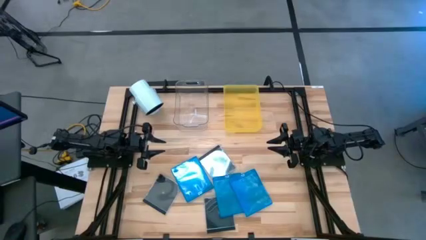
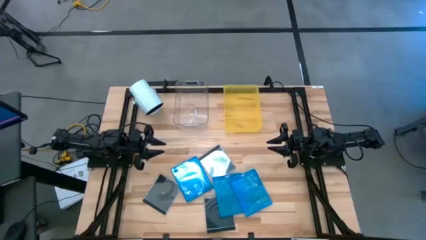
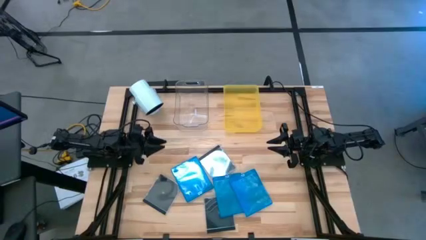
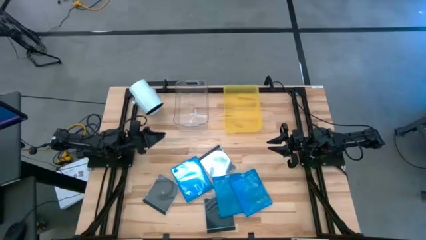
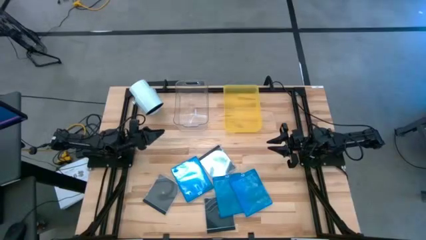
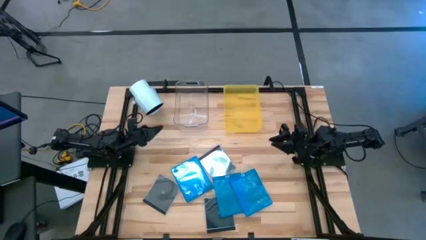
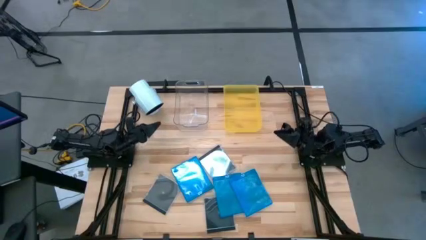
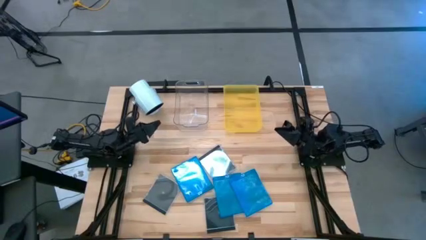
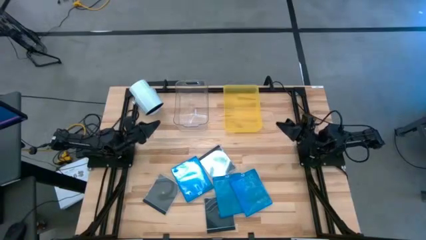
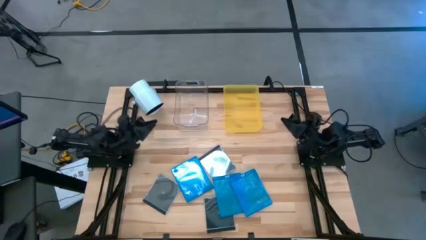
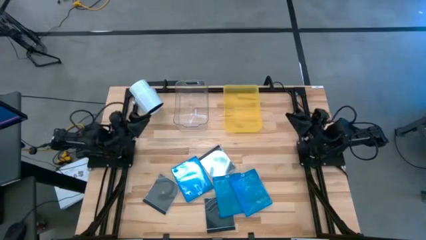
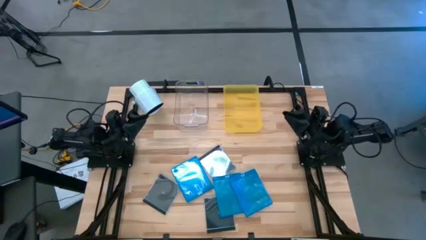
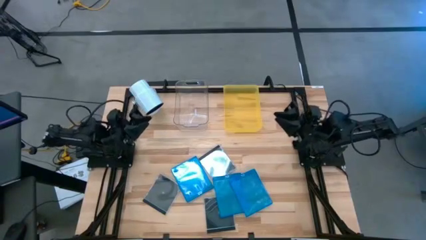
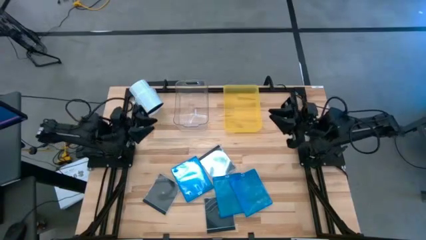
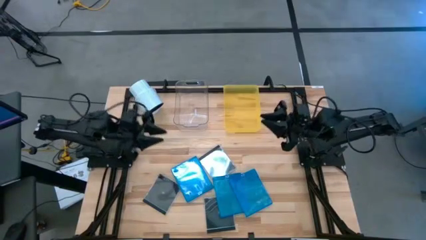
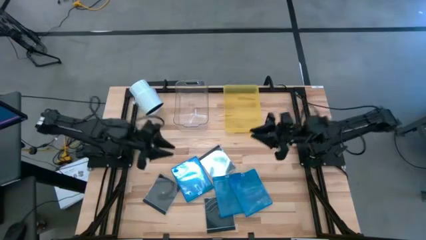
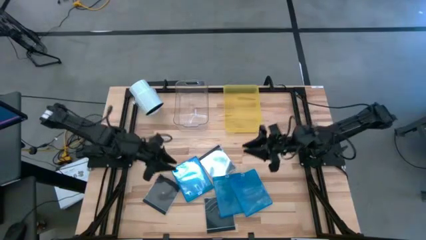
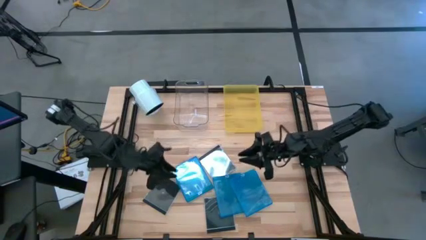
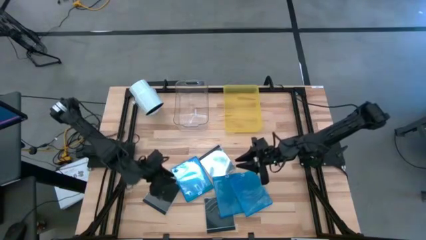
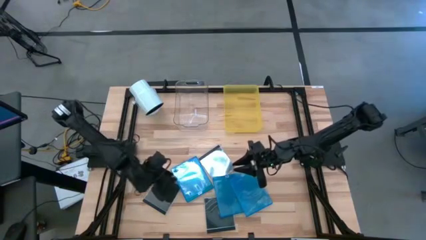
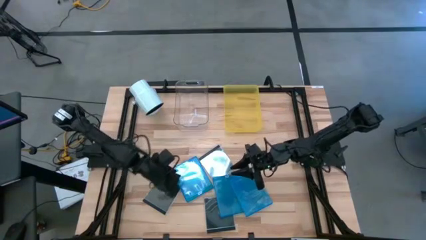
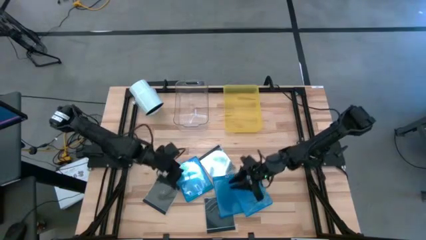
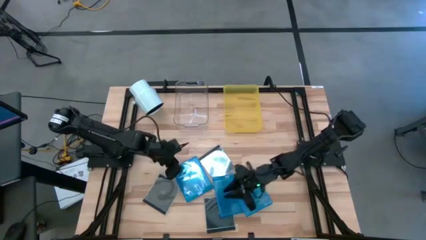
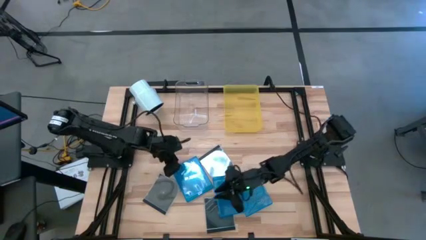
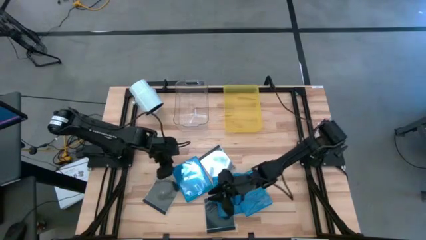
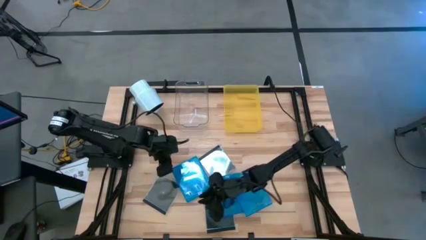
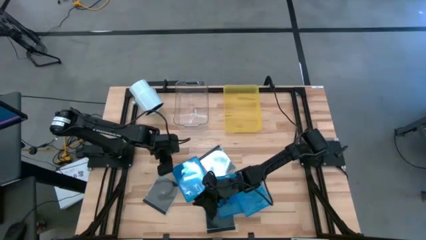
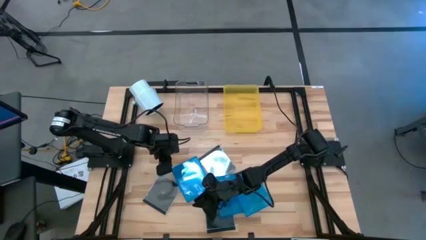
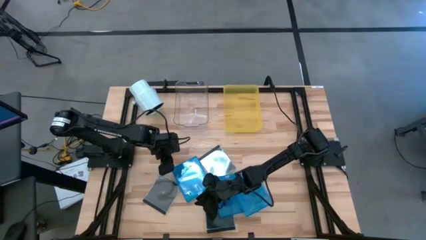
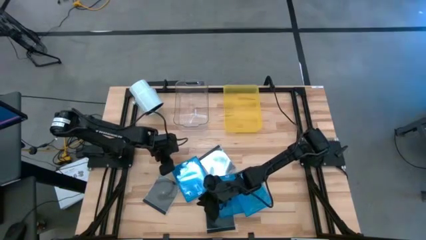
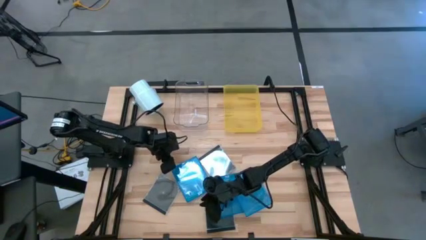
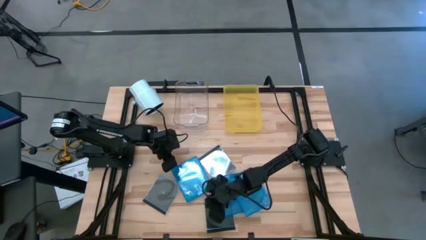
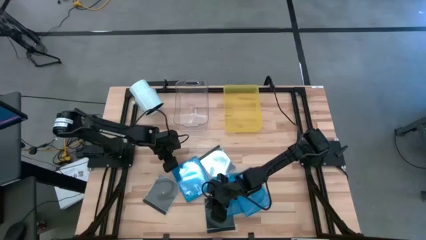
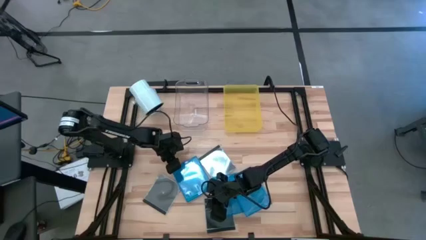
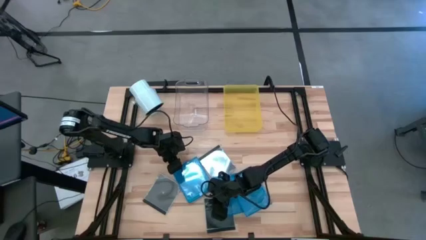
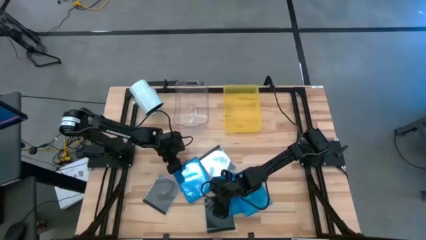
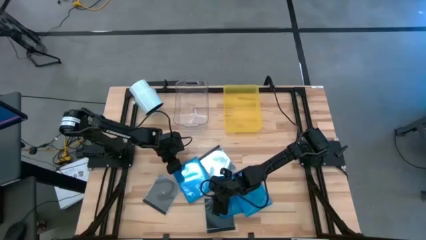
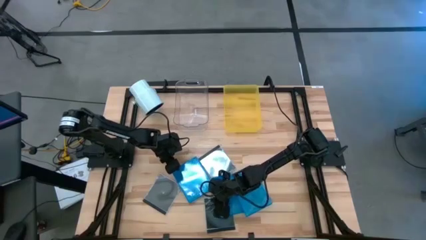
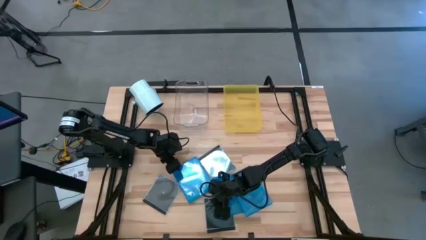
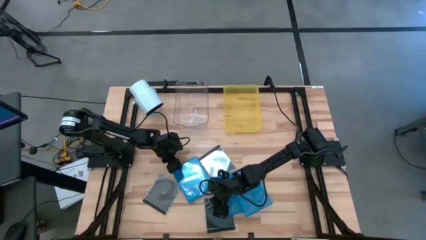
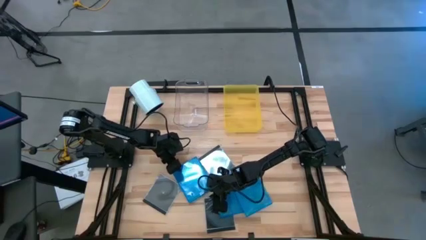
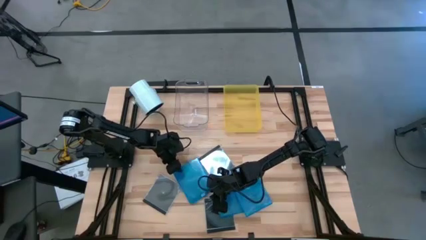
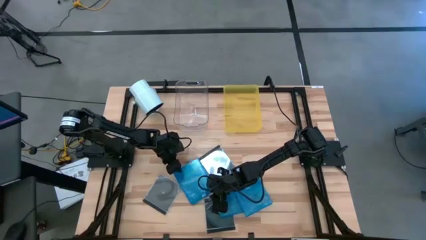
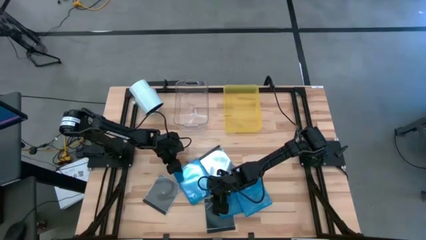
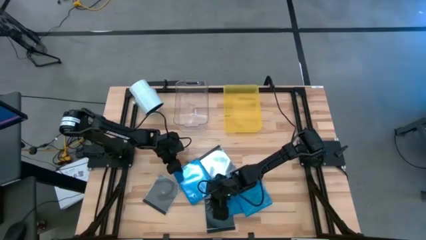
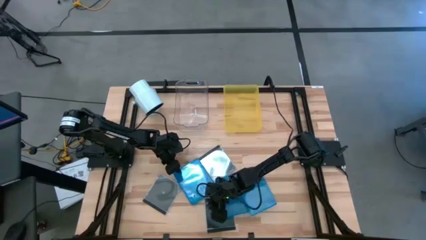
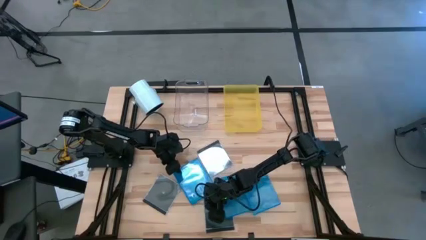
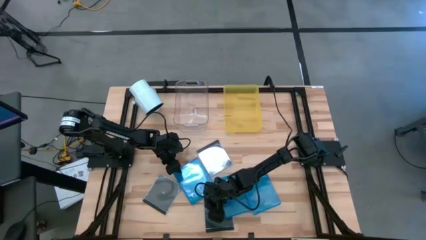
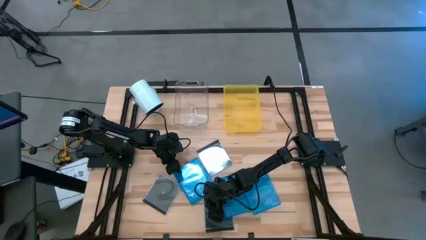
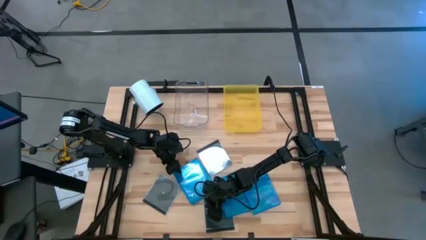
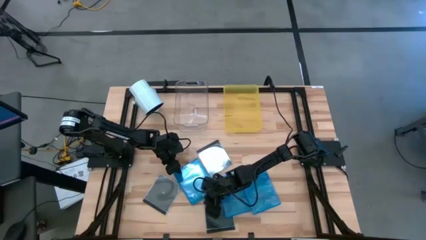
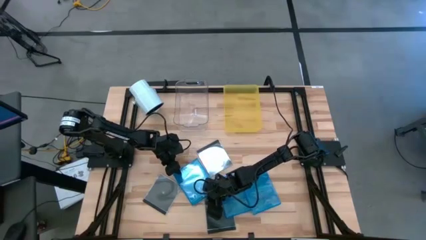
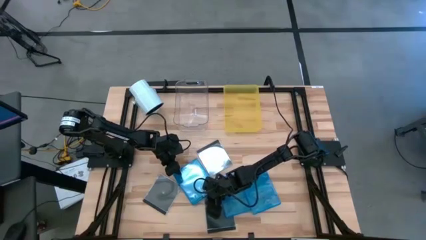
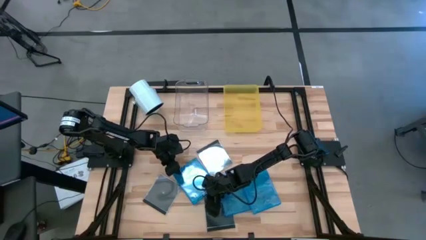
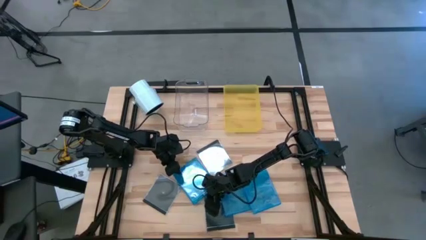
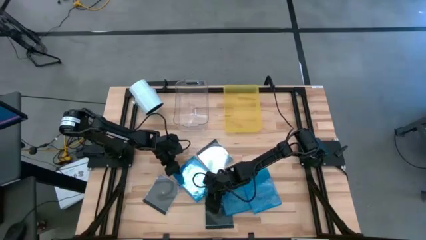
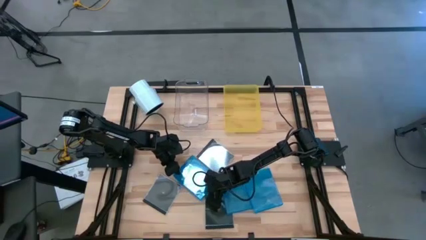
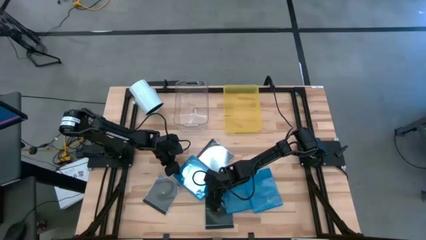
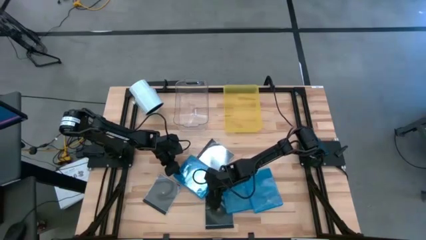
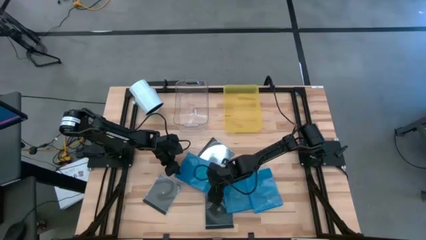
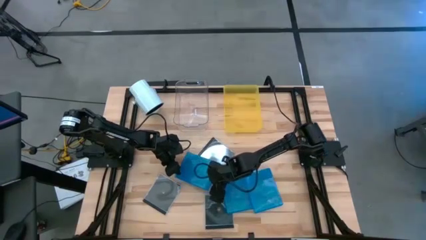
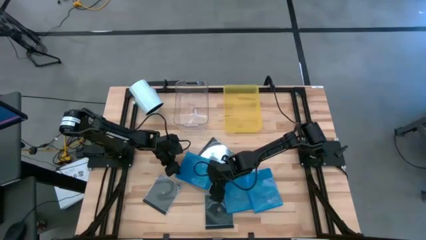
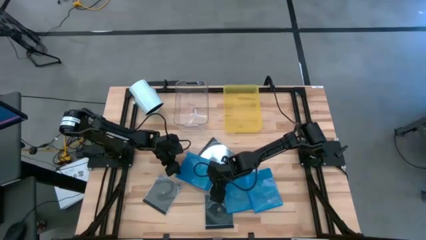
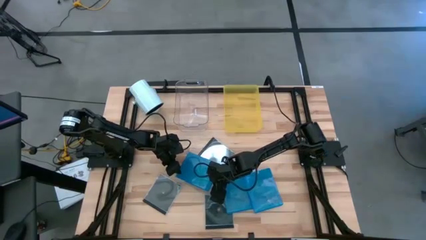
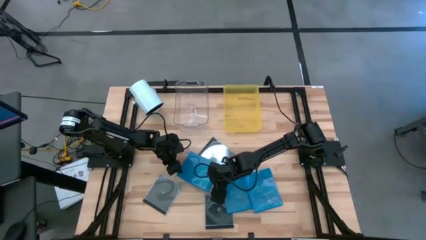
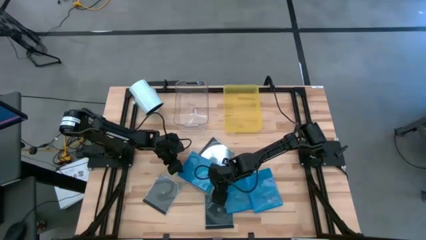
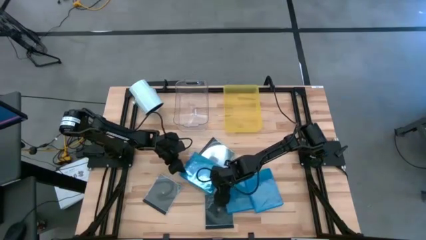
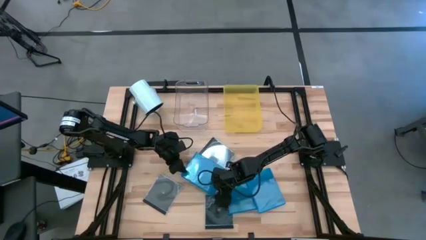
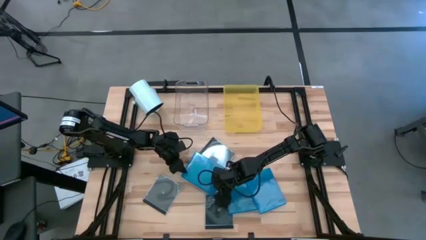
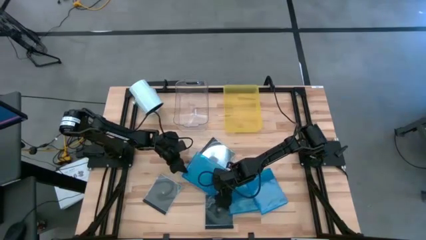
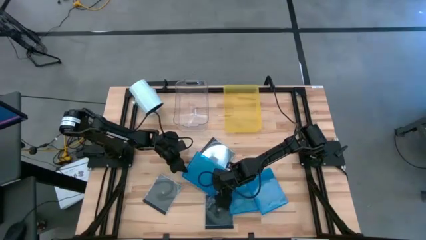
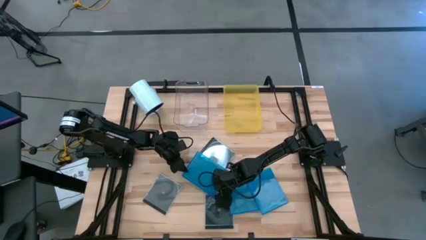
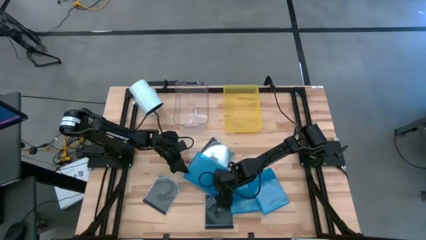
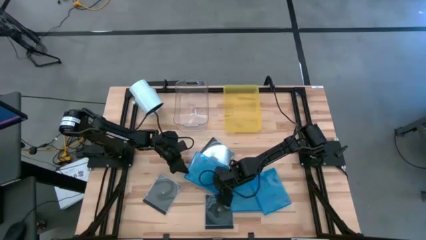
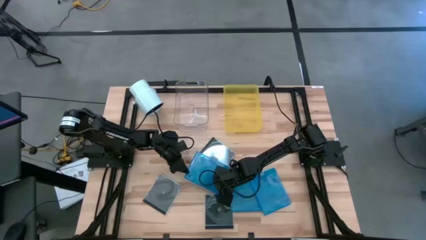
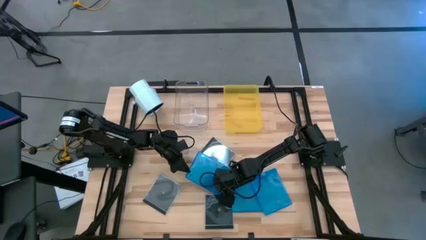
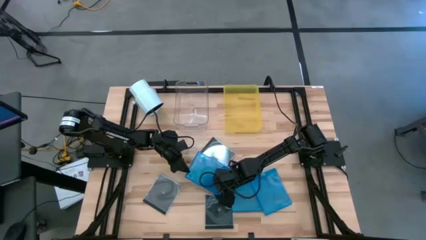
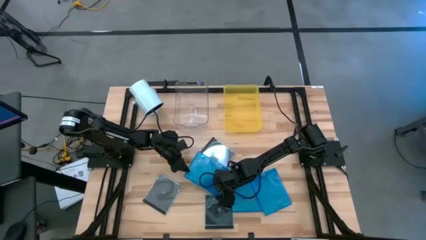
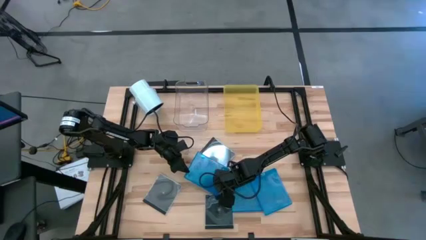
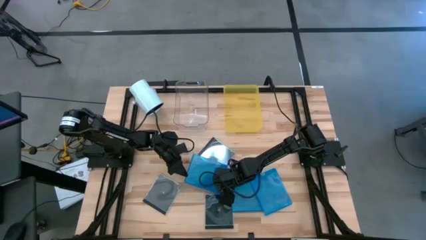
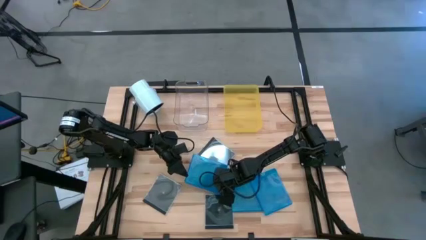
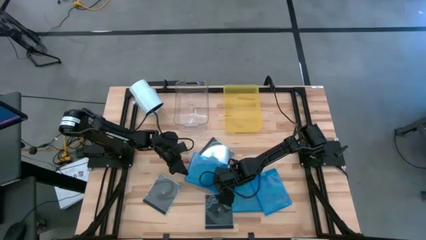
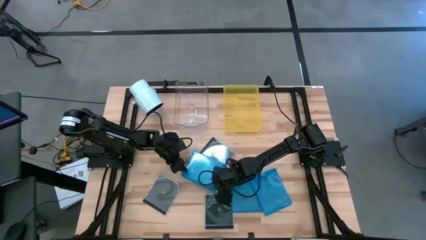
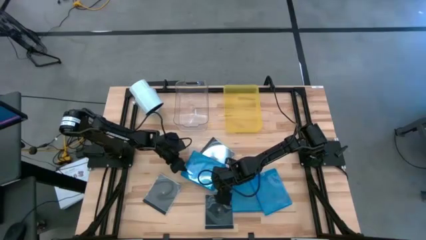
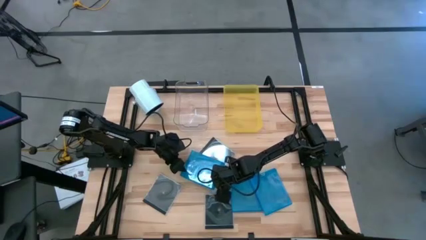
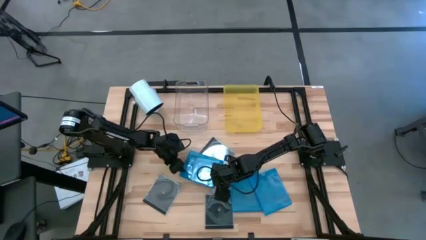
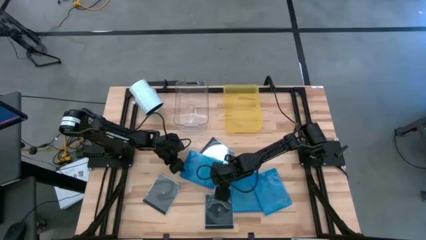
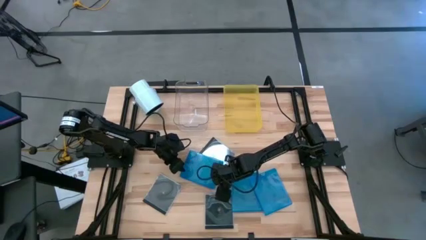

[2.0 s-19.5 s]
Task: Pick & place jewel cases by type
Put the left blue CD case into the transparent bin
